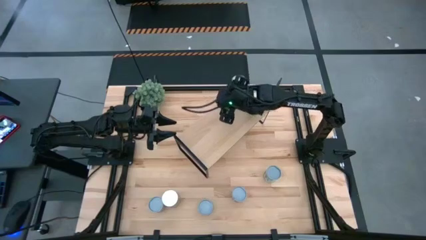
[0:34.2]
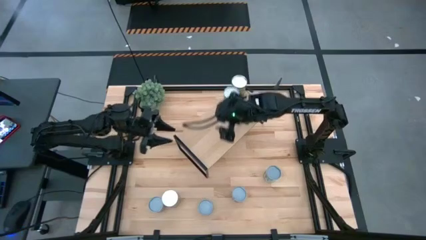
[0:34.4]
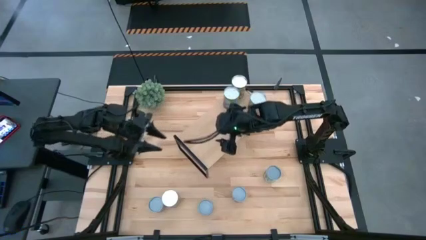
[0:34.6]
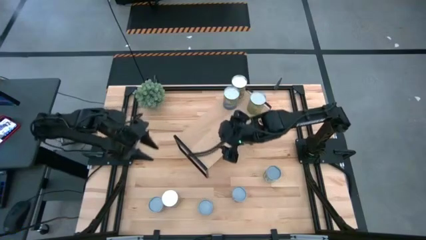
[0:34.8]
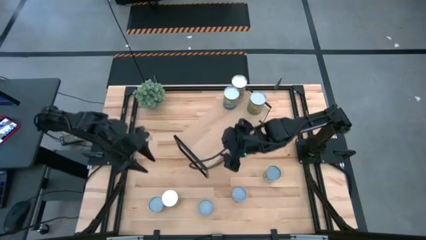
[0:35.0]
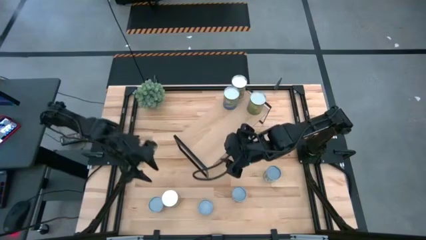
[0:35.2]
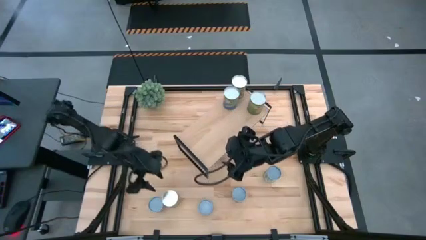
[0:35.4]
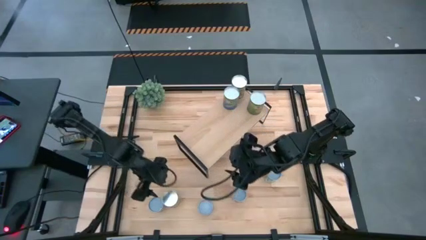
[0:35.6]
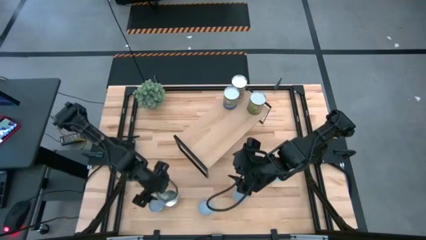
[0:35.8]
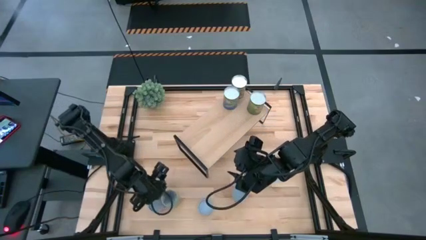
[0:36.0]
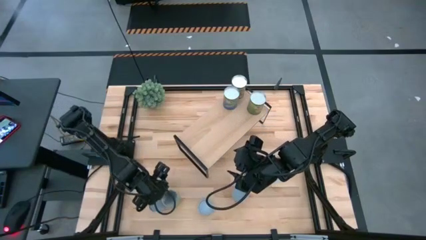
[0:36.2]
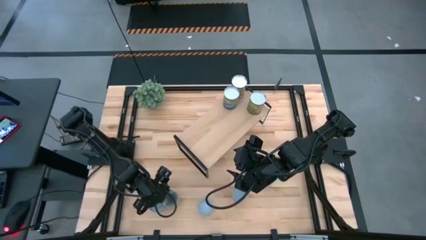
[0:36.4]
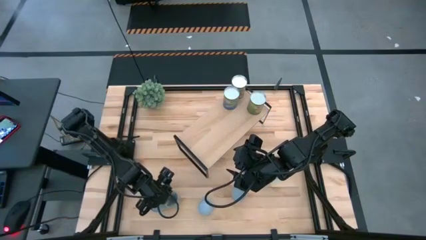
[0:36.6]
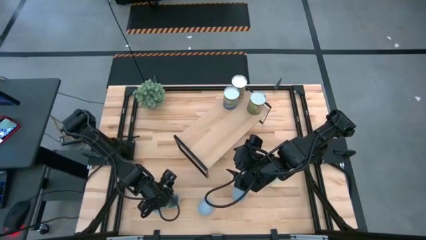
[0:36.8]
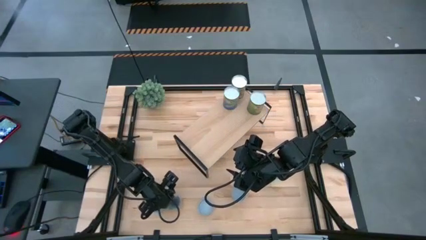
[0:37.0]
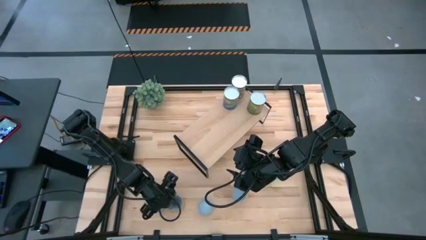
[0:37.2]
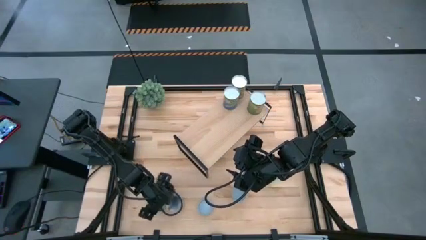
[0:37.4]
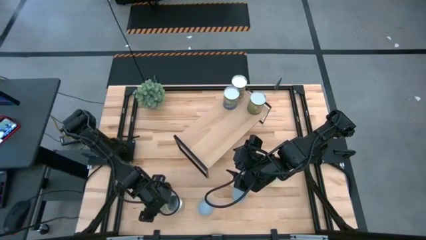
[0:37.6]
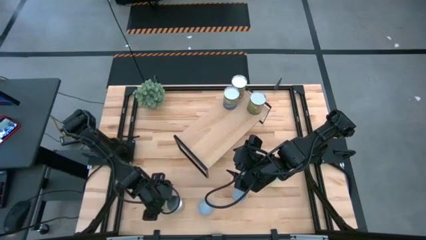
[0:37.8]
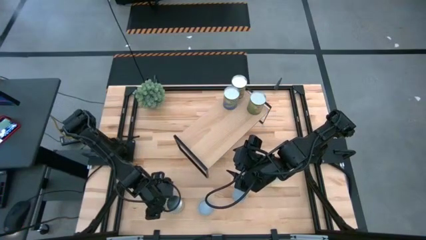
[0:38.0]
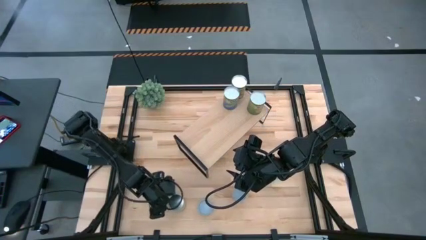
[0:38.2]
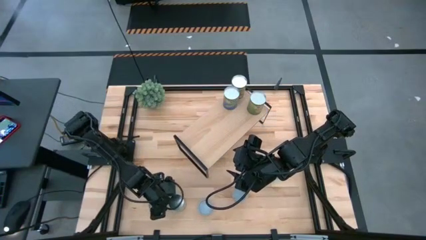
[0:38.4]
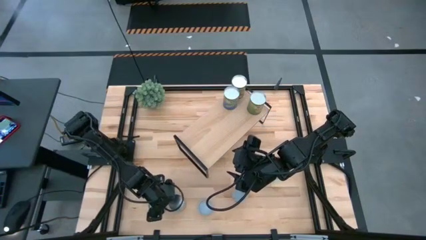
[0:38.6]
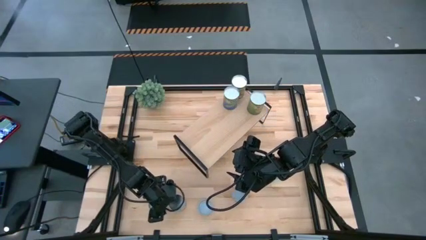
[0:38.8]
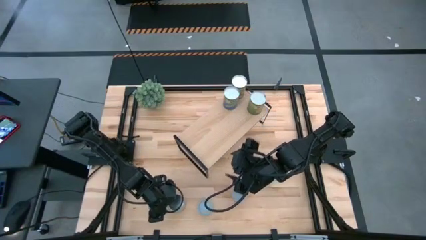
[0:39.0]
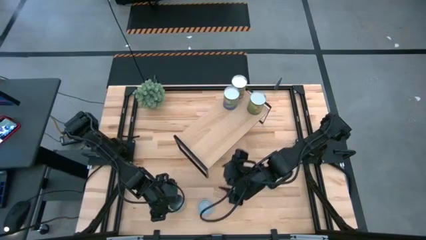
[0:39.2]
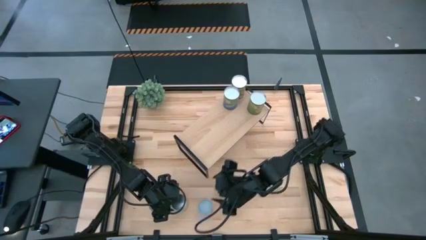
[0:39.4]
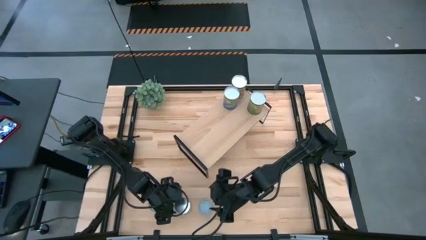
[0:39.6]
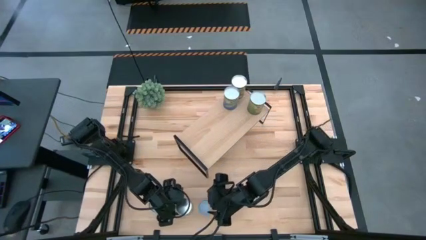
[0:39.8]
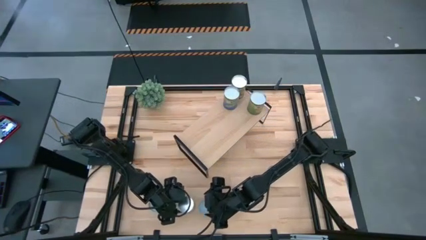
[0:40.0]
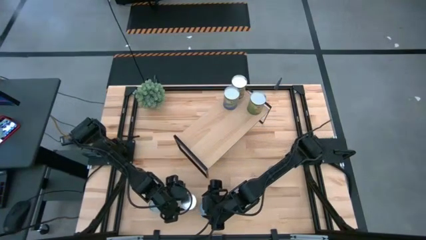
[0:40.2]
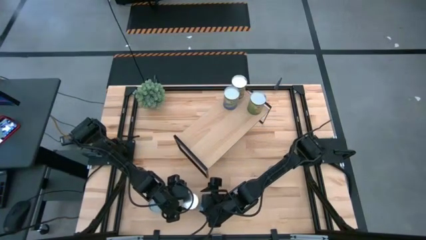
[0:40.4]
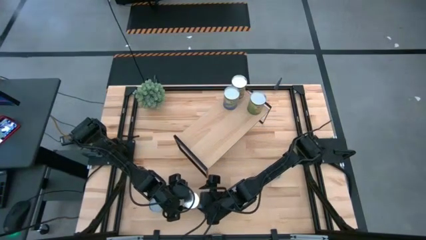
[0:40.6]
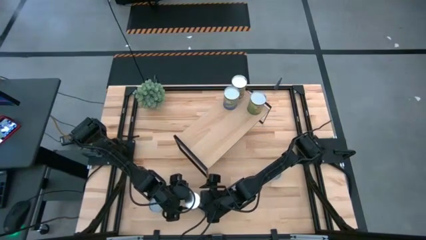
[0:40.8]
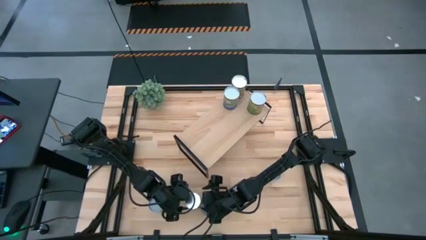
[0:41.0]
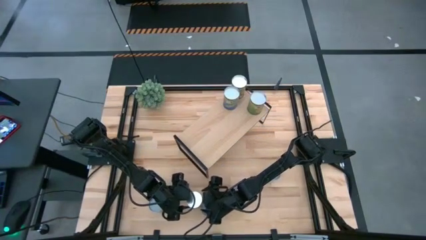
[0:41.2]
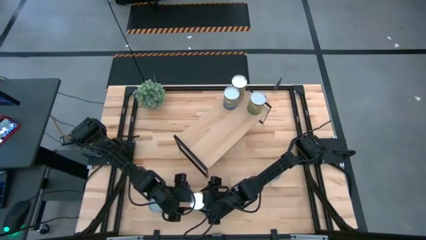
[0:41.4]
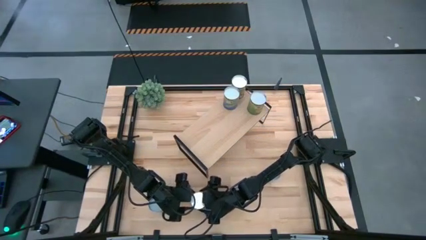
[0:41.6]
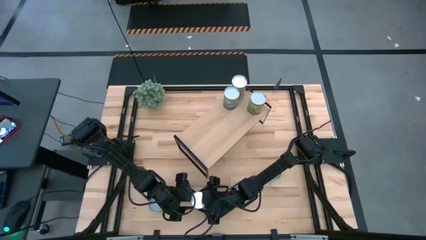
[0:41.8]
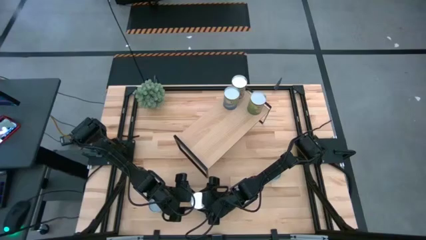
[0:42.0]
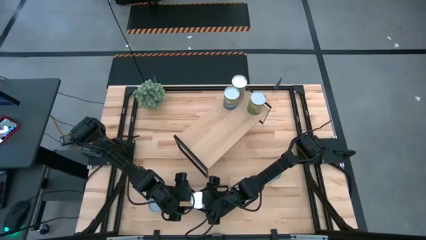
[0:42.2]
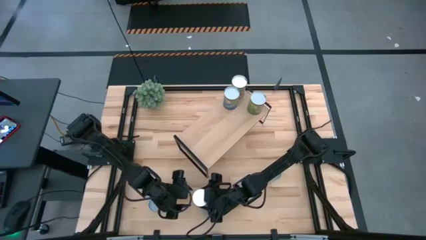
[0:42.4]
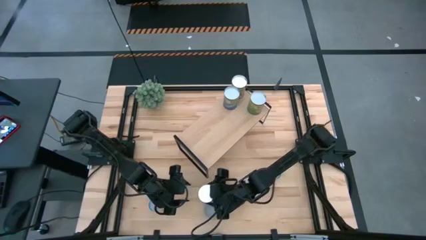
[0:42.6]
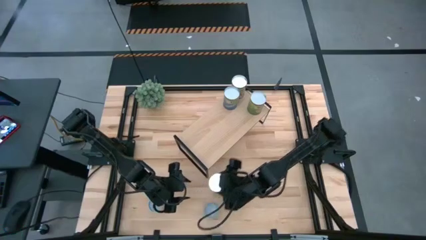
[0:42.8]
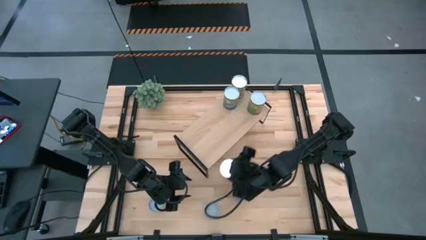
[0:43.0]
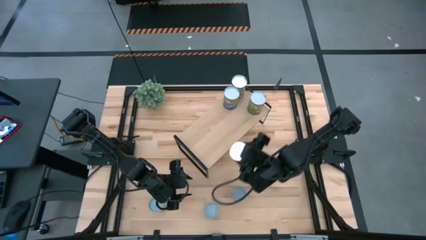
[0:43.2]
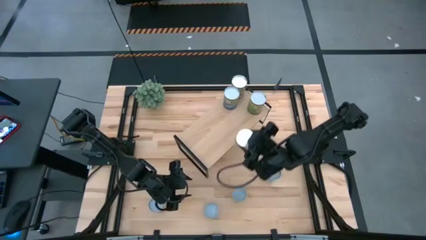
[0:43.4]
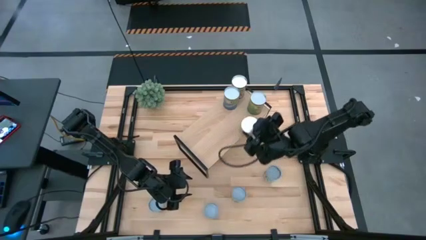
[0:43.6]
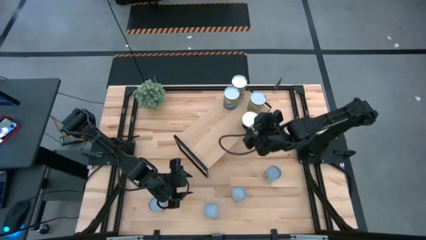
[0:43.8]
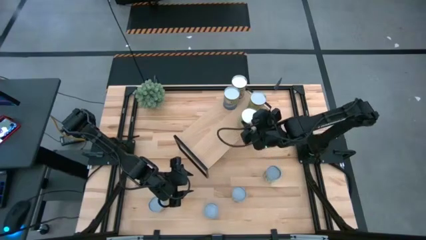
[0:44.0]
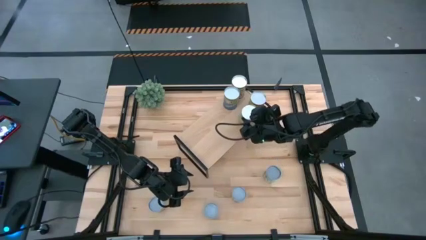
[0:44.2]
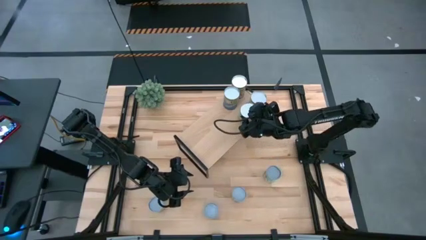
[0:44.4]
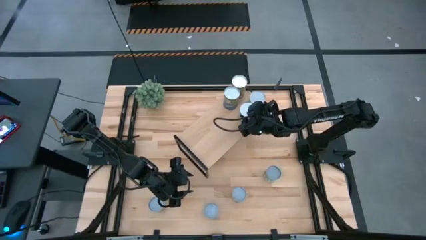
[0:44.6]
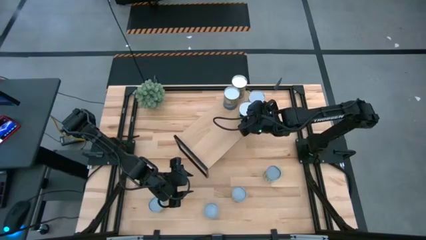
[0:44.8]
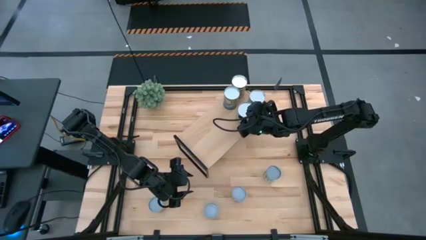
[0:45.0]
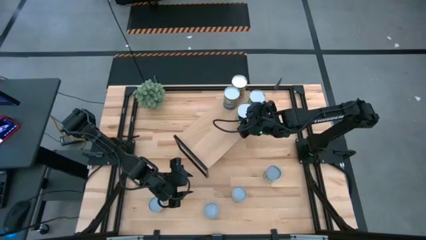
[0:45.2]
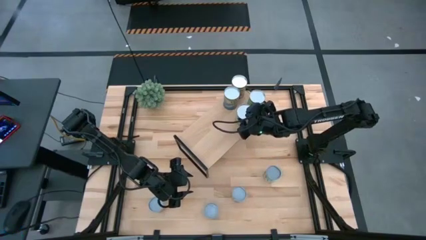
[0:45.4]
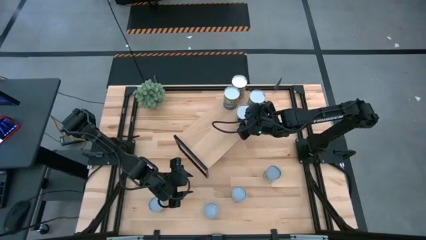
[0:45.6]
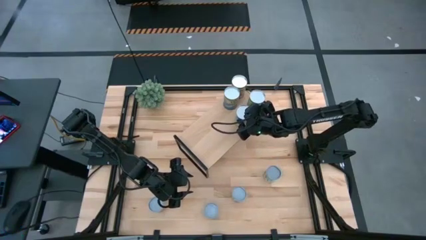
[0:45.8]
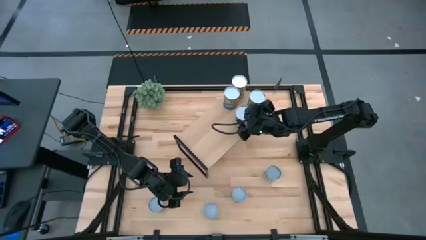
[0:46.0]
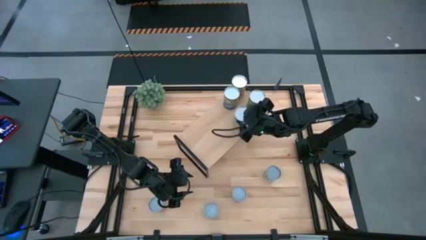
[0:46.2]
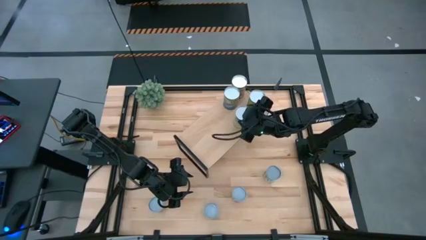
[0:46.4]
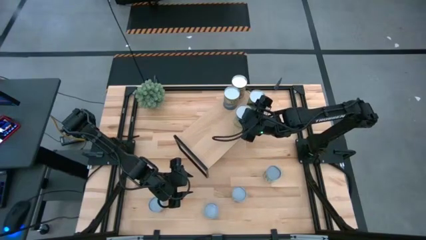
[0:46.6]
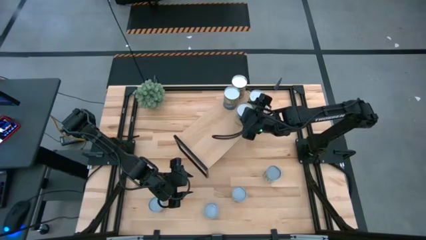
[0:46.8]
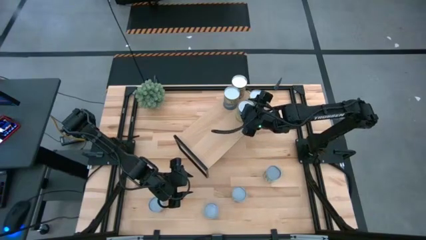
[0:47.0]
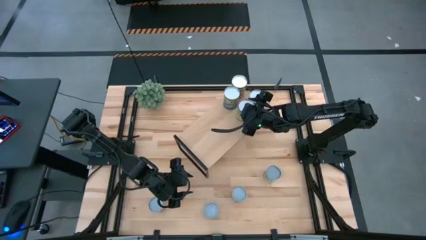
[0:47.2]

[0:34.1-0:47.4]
Task: Pick and place cans onto a shelf
Put the canned carrots on the shelf
